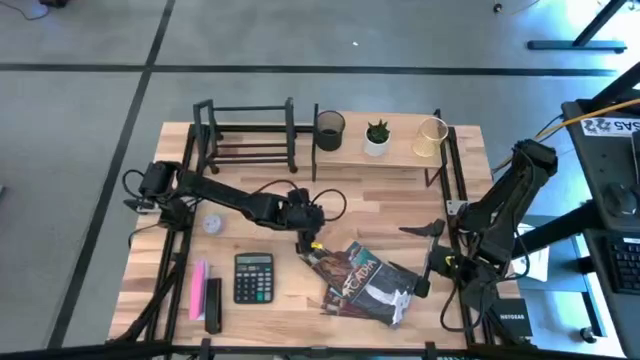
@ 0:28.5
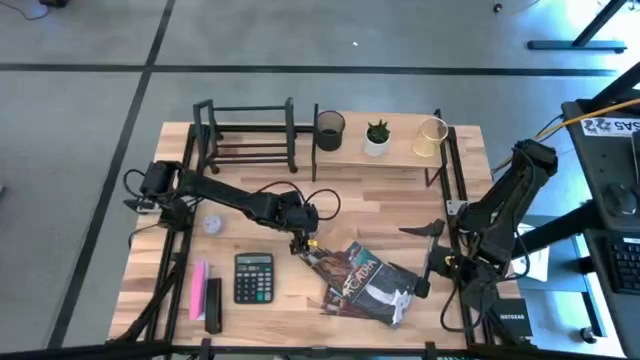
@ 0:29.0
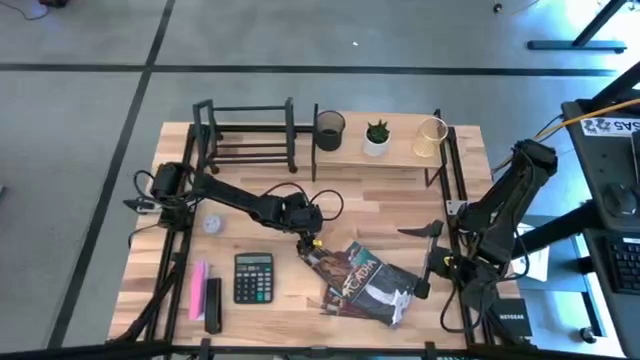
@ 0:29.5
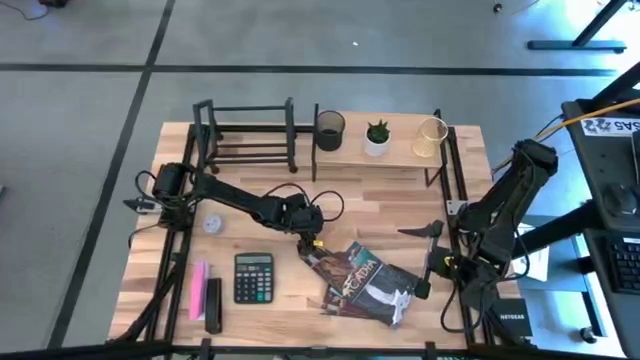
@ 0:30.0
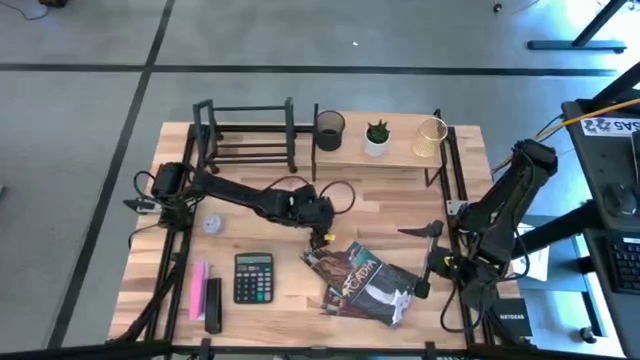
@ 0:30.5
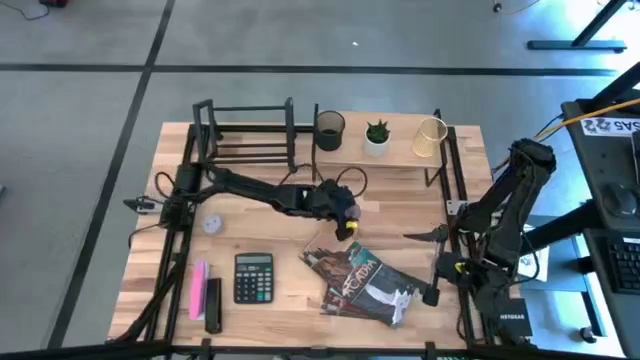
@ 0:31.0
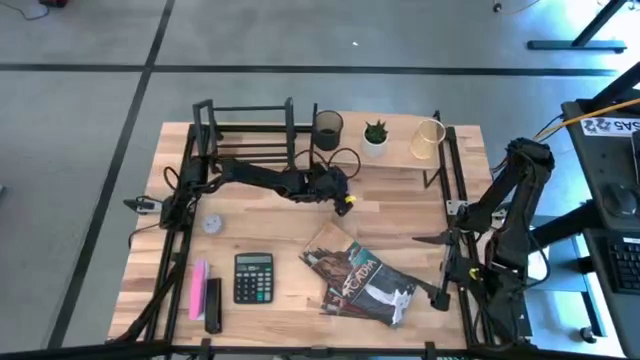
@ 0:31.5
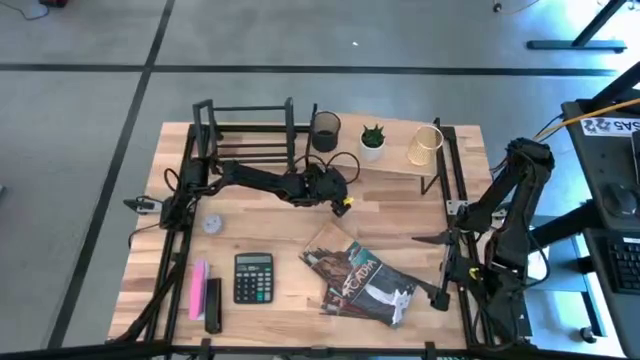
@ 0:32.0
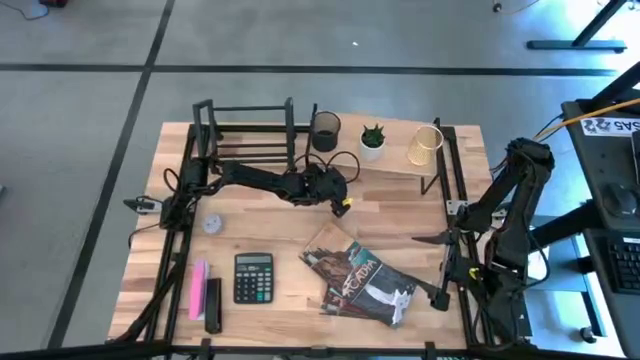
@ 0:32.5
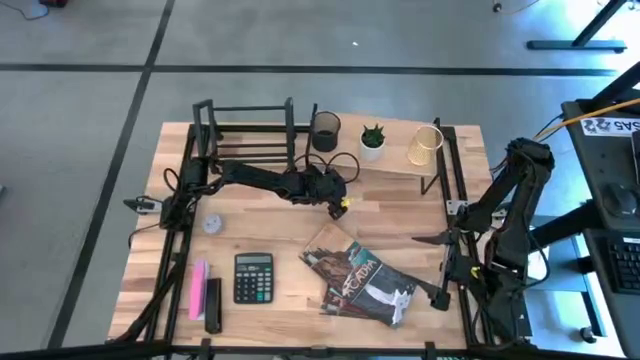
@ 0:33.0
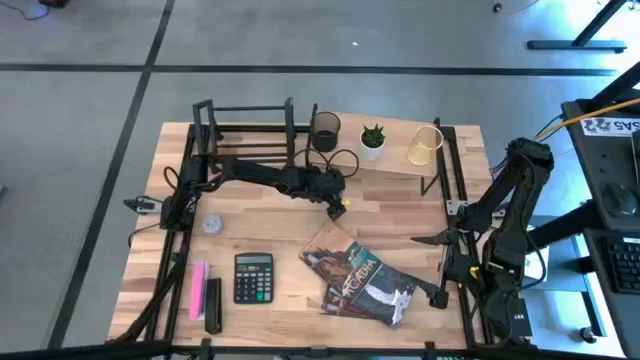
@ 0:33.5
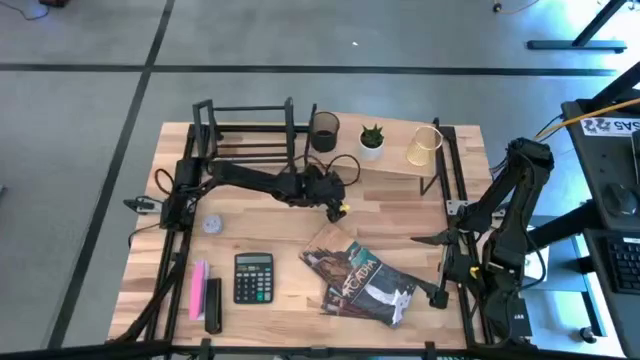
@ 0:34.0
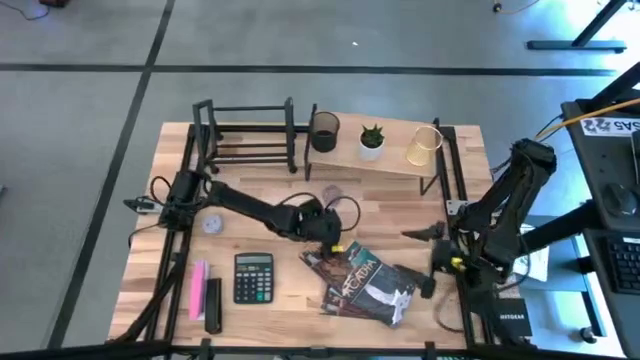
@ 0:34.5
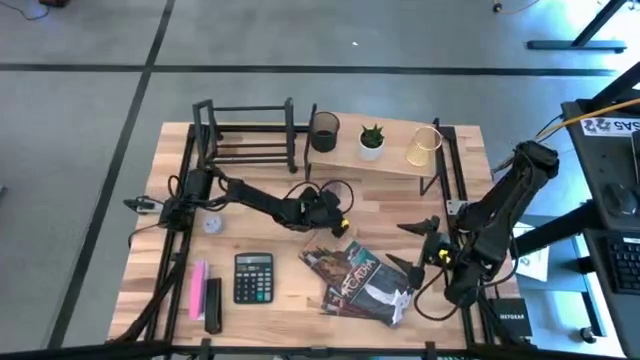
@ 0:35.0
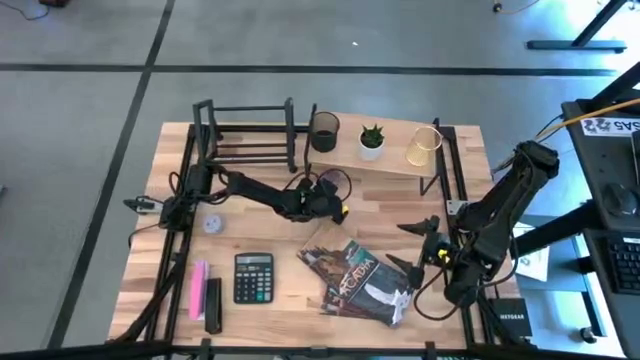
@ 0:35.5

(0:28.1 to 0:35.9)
Task: Stock shelves
Put the red scented candle jar under the shelf

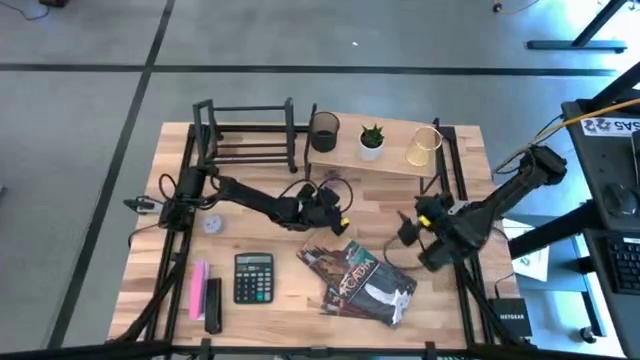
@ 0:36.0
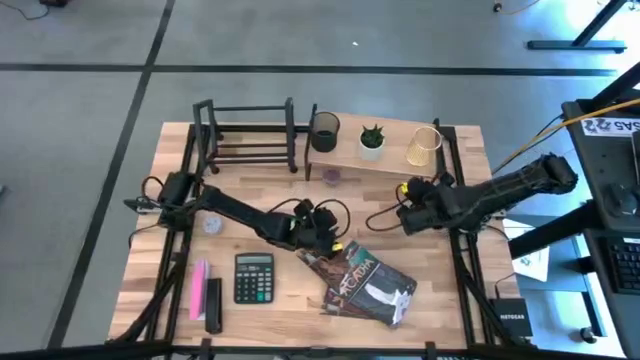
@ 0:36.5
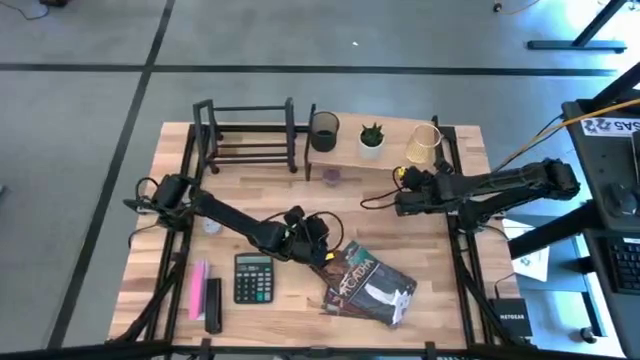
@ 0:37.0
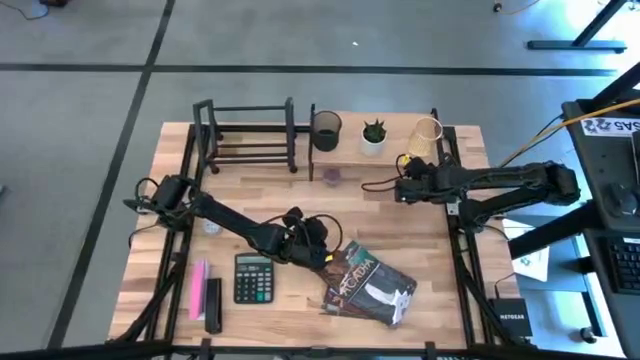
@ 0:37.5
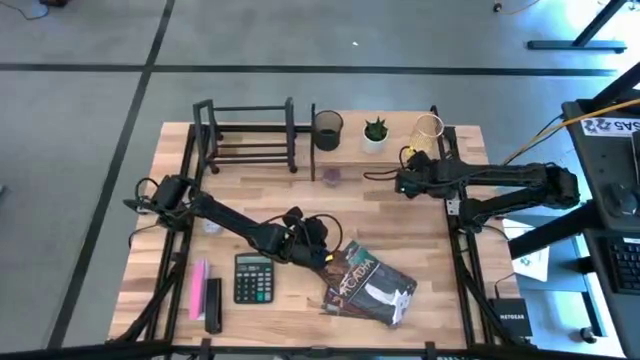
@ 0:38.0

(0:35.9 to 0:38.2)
Adjust the shelf

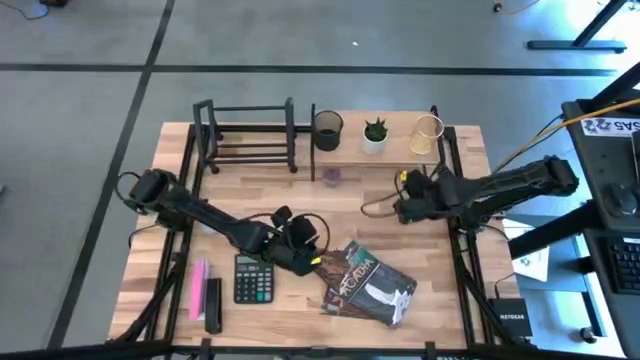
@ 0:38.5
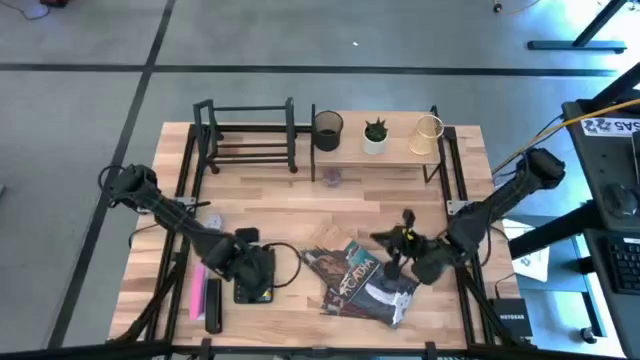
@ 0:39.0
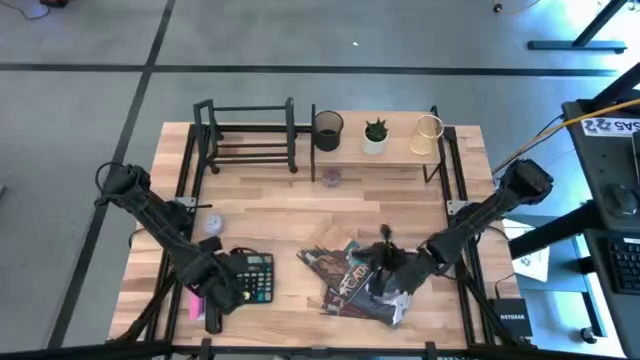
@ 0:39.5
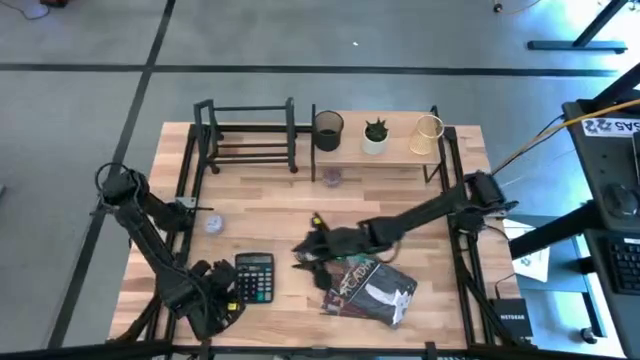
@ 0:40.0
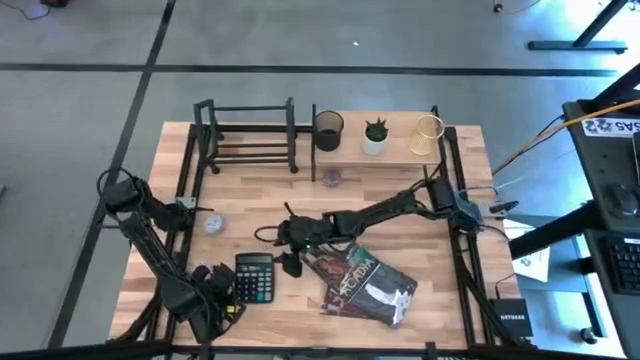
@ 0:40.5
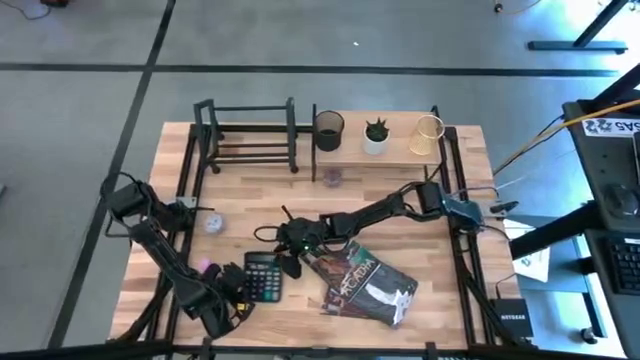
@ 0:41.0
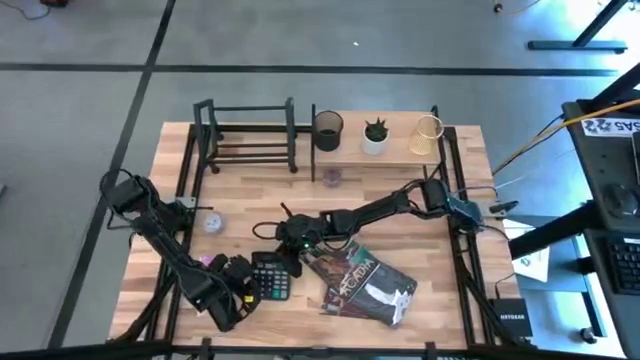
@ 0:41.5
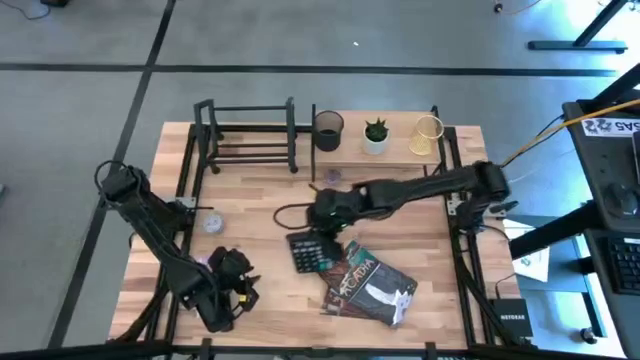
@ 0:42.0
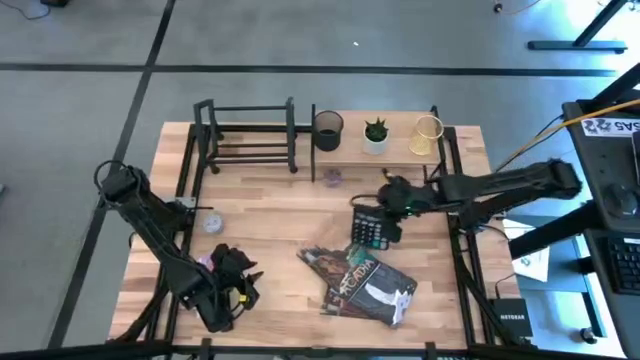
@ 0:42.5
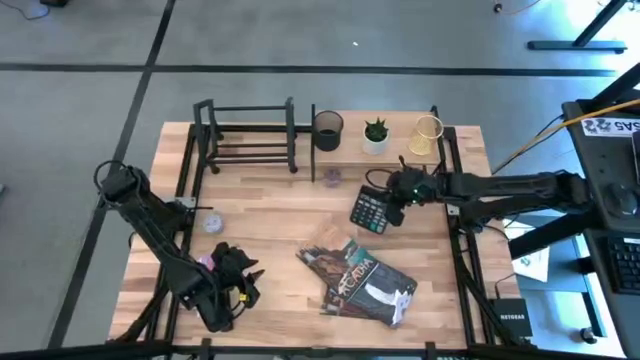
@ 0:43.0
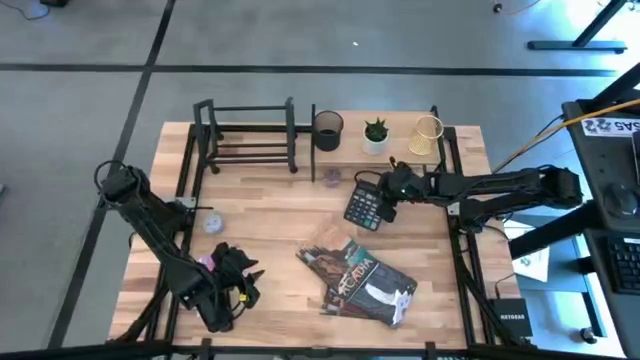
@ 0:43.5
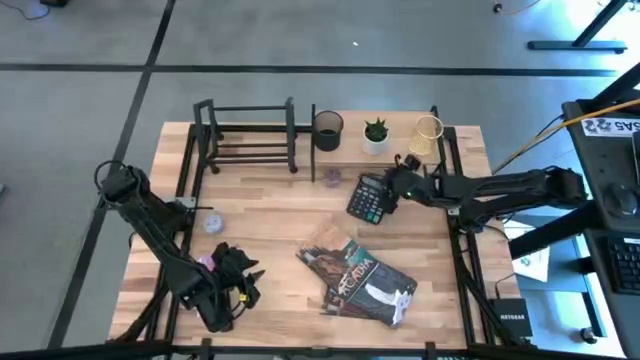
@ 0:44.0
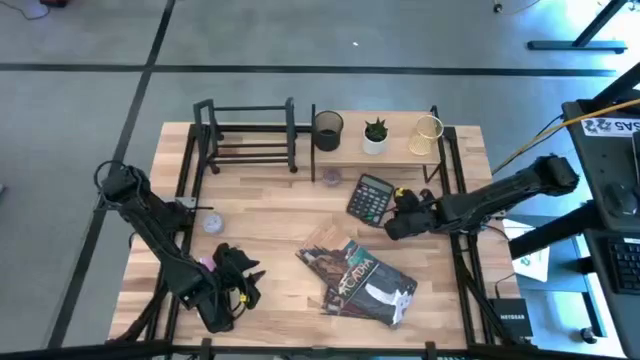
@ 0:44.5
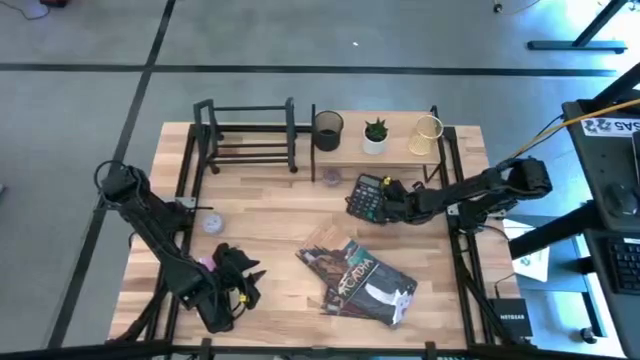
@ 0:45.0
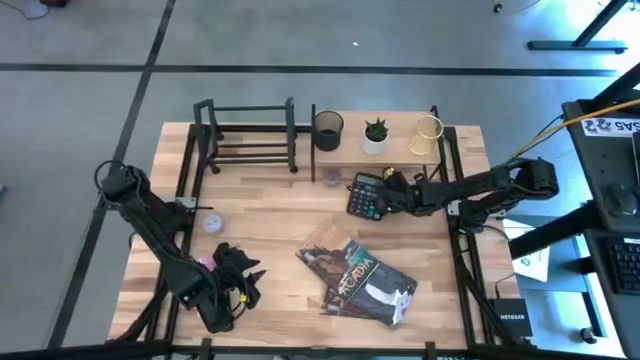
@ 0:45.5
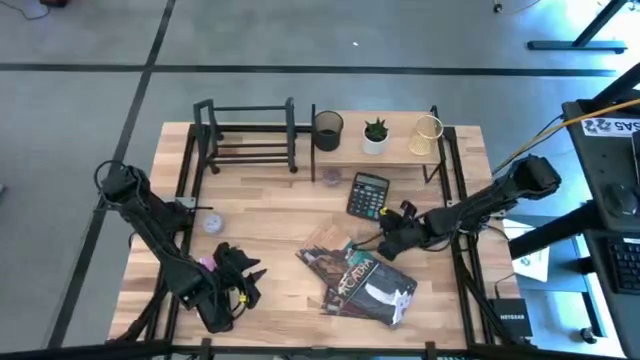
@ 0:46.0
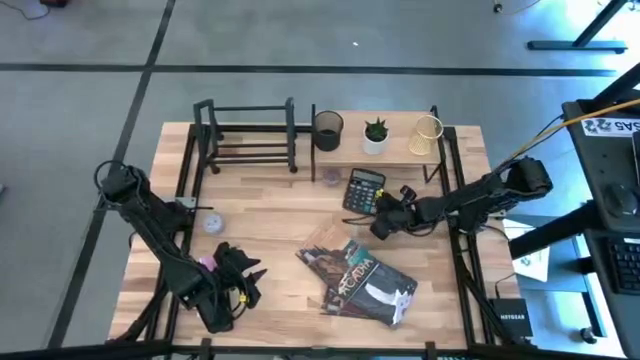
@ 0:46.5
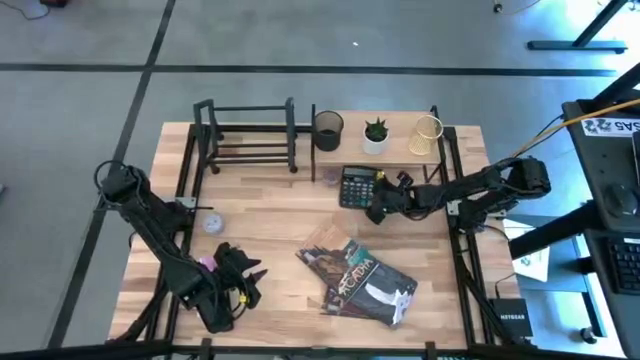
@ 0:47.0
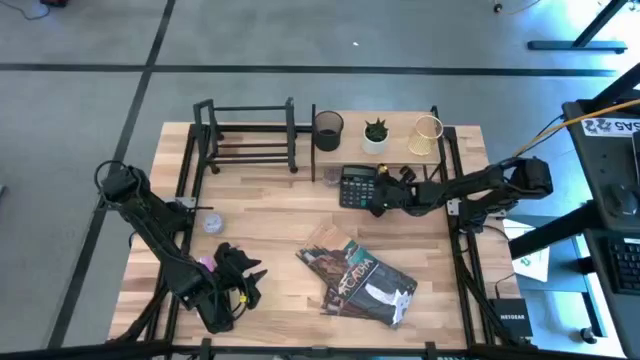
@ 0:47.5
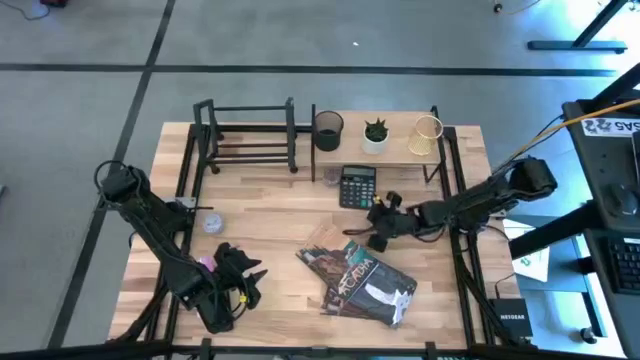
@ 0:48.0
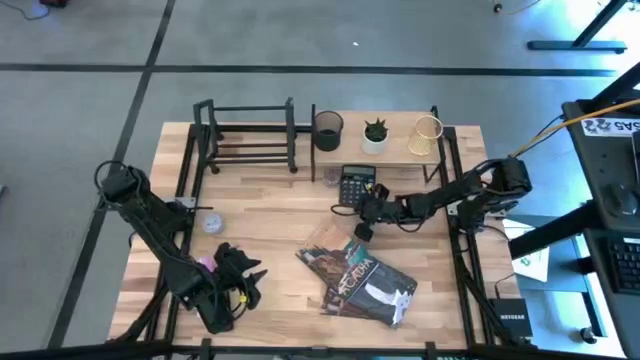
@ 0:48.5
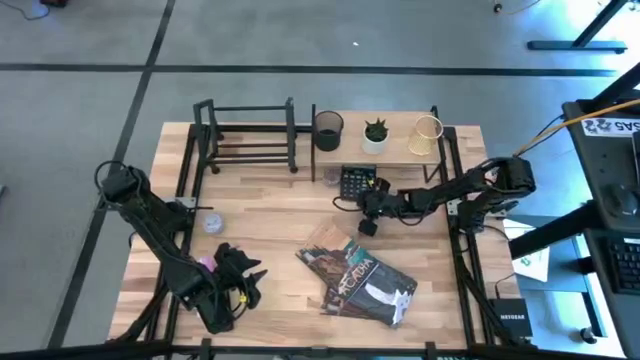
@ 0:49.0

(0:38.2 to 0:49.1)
Put the black calculator under the shelf
